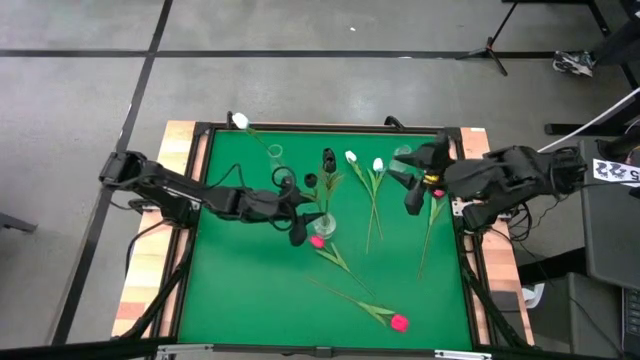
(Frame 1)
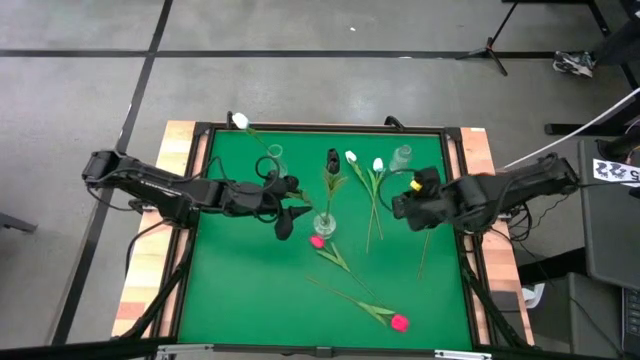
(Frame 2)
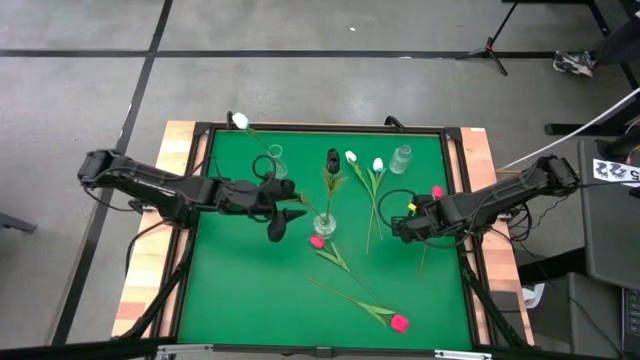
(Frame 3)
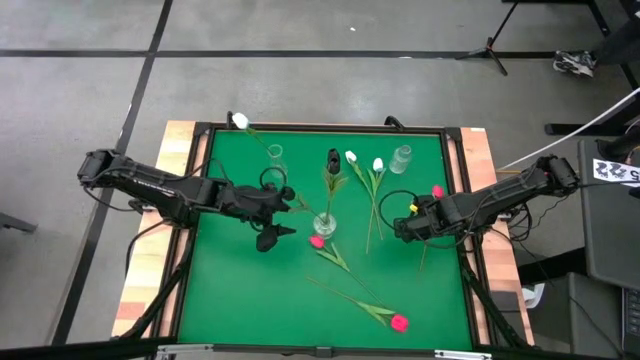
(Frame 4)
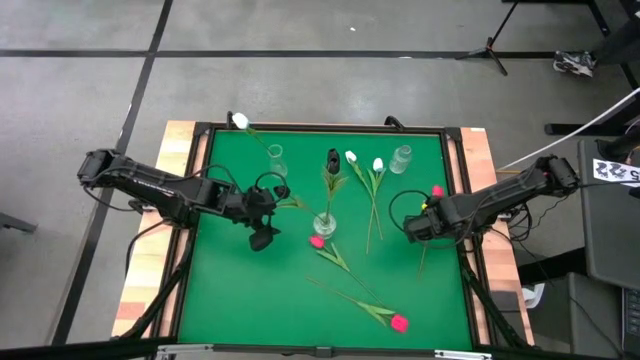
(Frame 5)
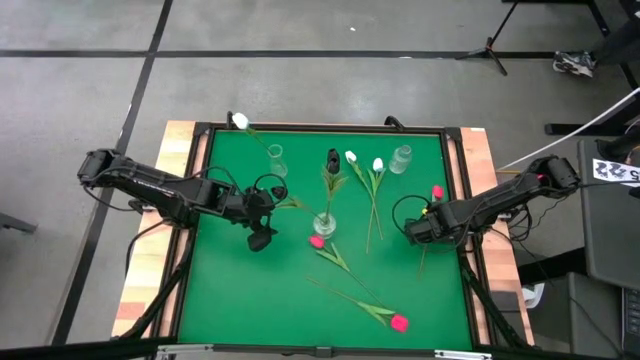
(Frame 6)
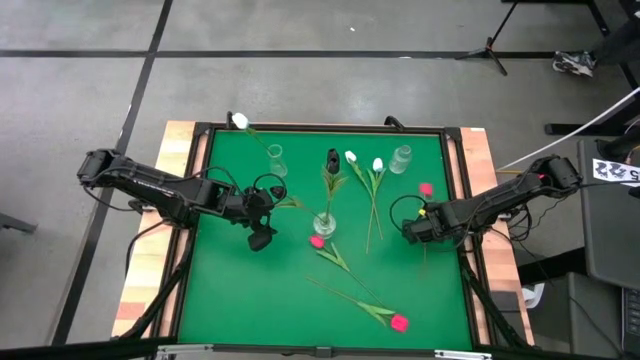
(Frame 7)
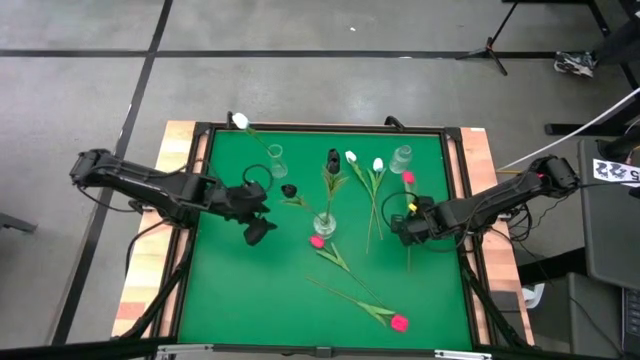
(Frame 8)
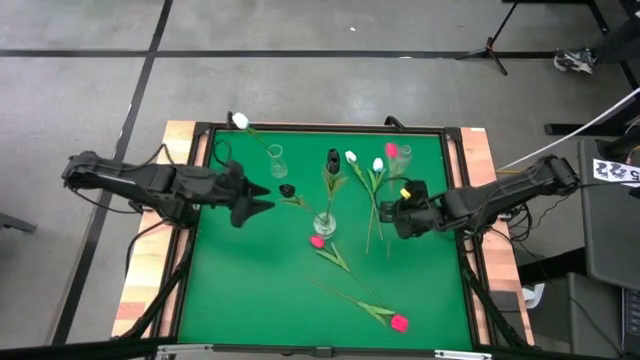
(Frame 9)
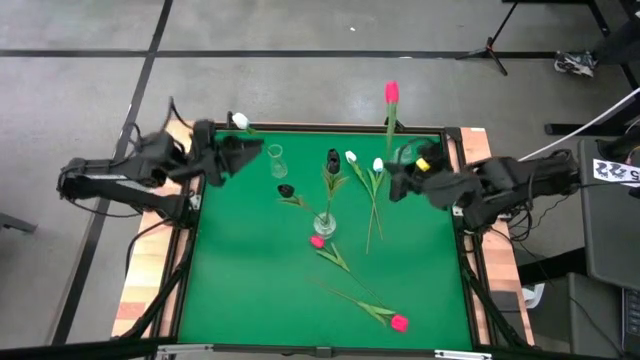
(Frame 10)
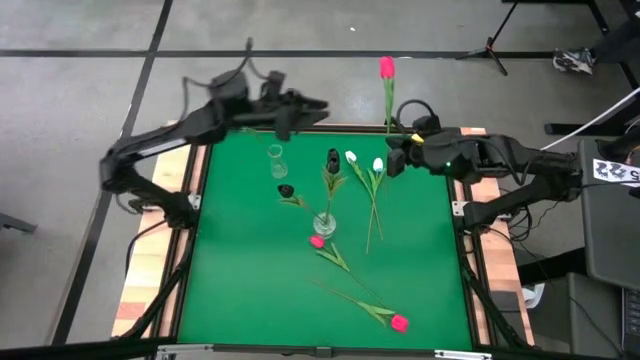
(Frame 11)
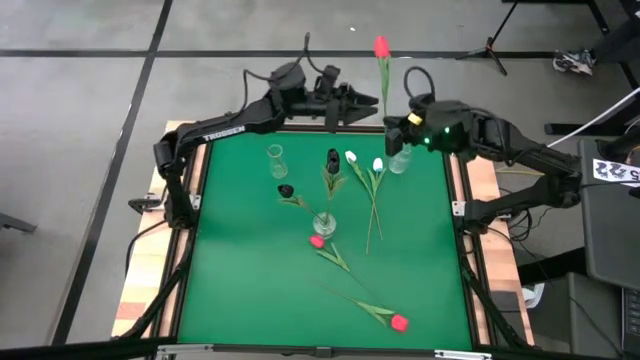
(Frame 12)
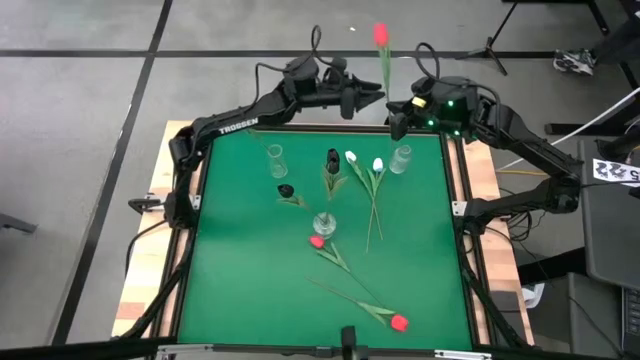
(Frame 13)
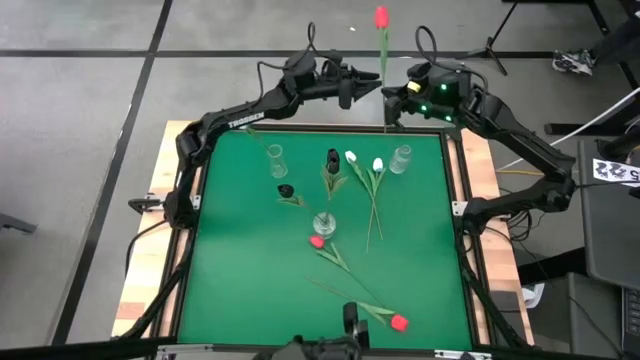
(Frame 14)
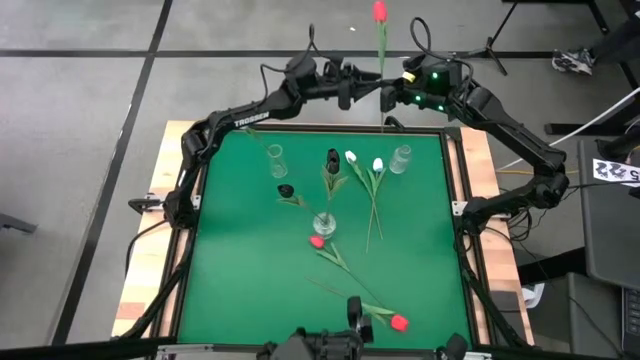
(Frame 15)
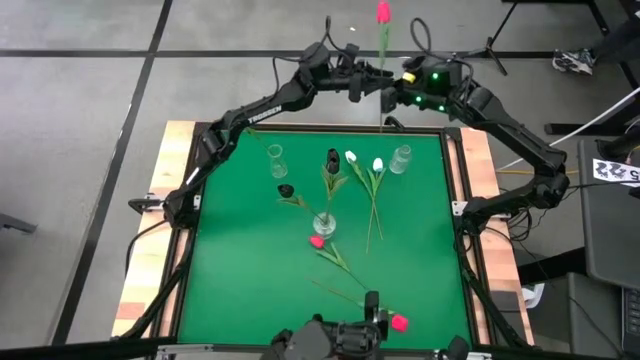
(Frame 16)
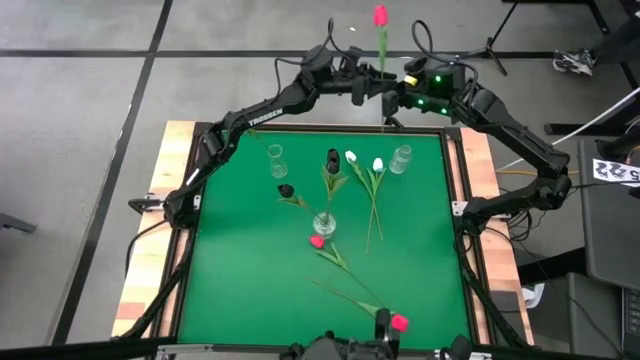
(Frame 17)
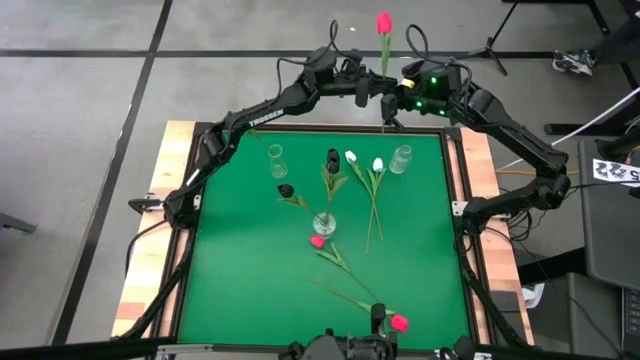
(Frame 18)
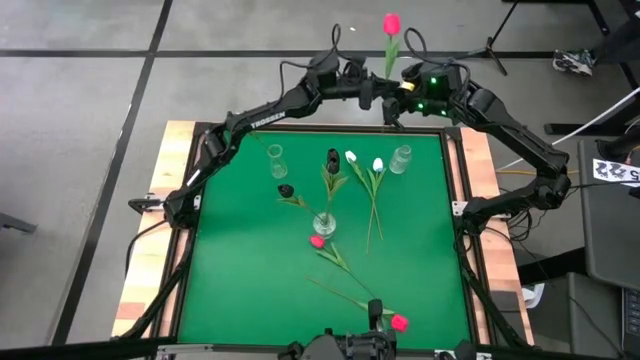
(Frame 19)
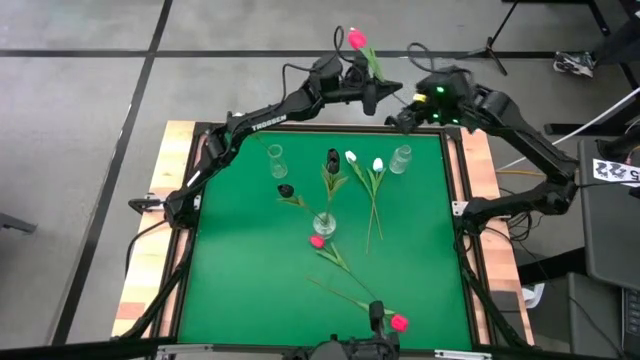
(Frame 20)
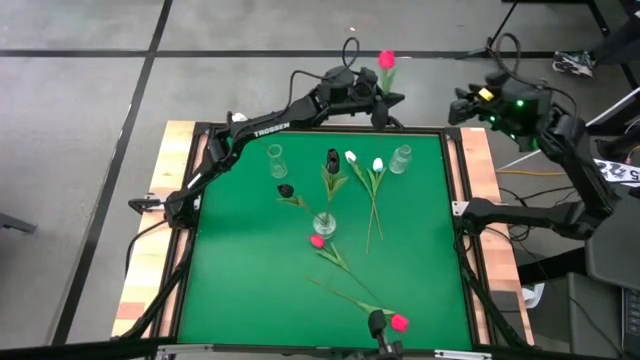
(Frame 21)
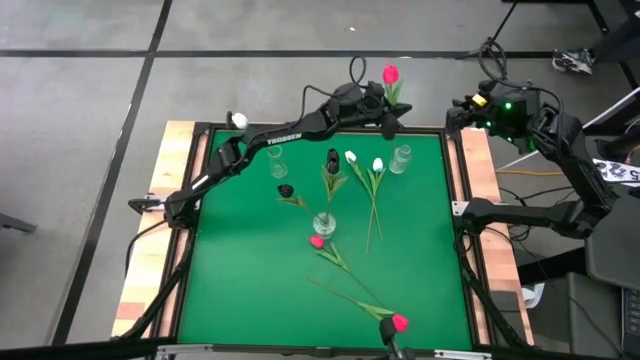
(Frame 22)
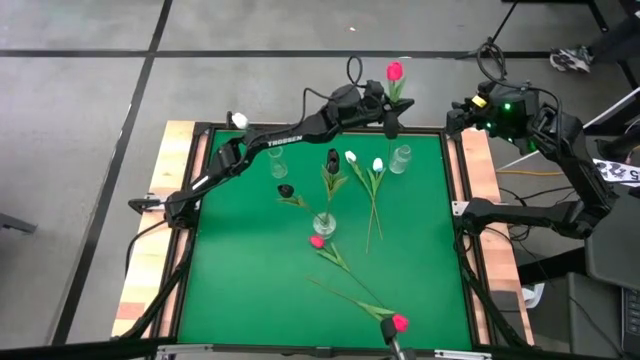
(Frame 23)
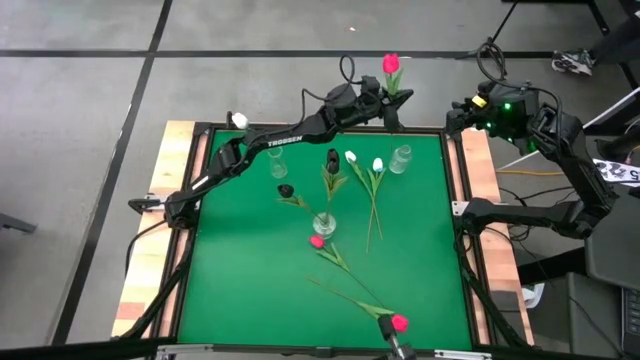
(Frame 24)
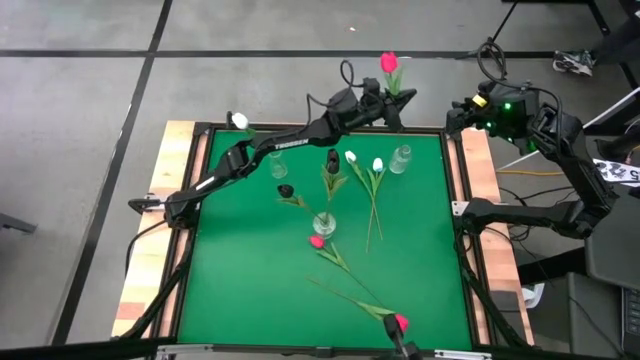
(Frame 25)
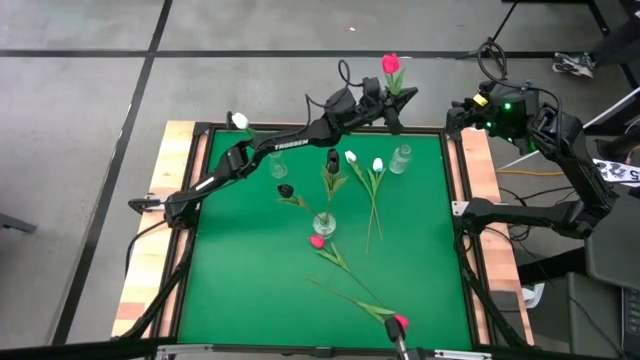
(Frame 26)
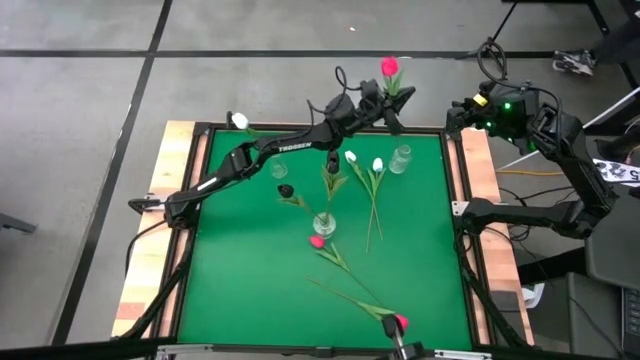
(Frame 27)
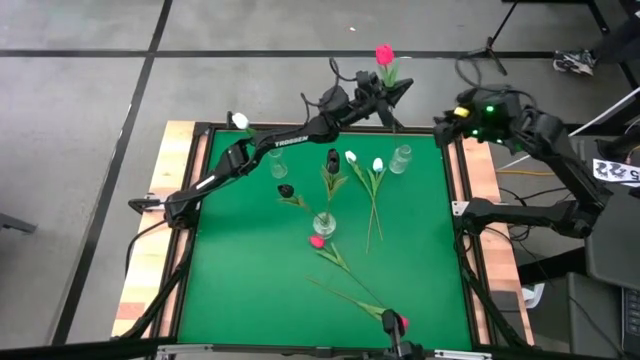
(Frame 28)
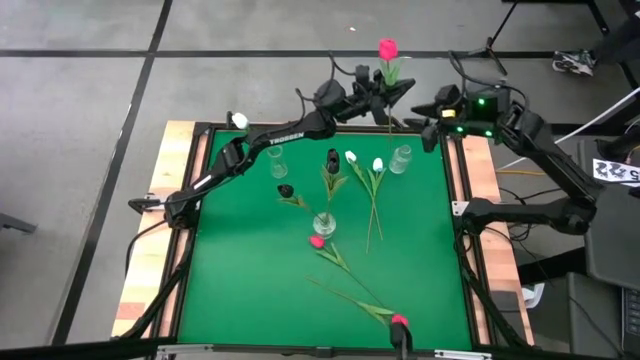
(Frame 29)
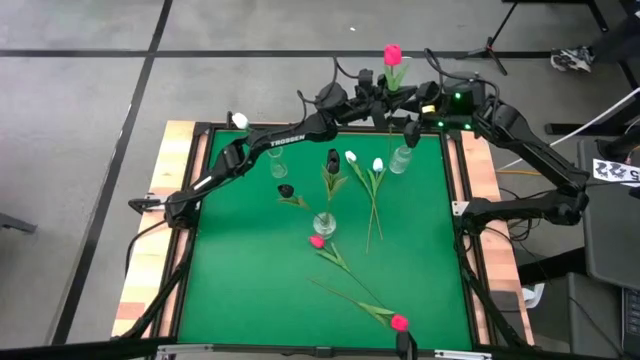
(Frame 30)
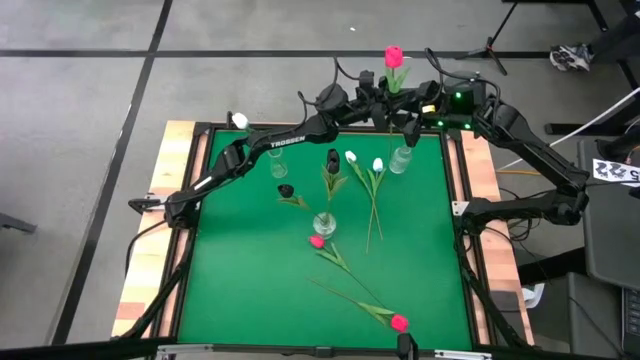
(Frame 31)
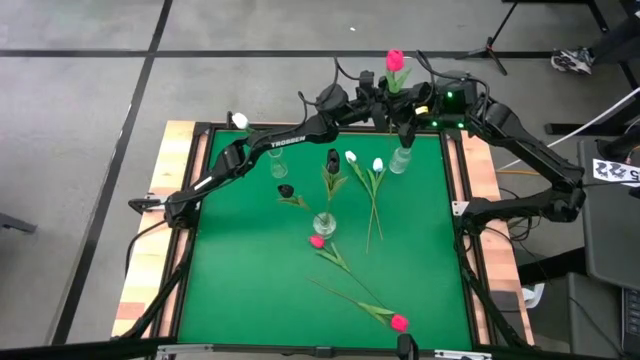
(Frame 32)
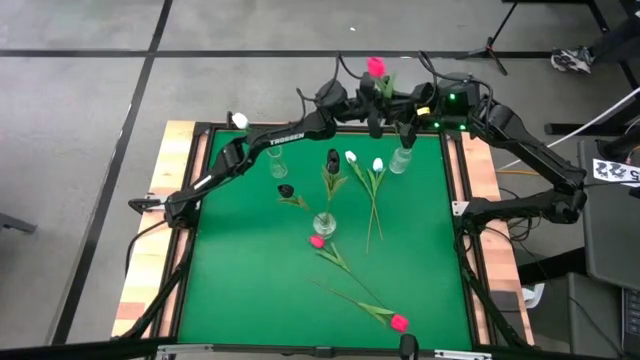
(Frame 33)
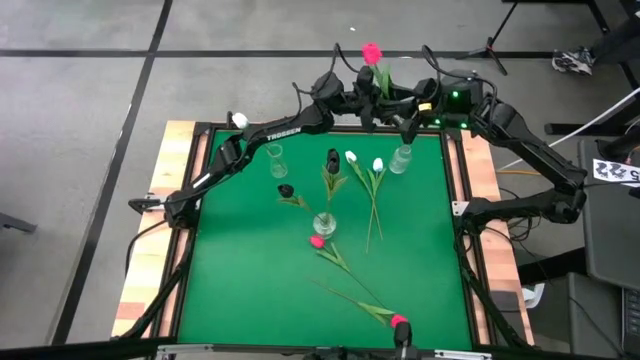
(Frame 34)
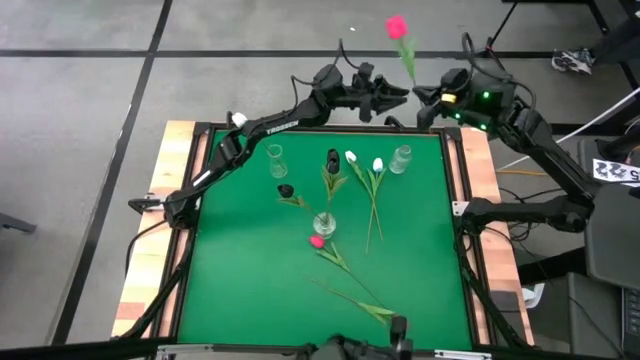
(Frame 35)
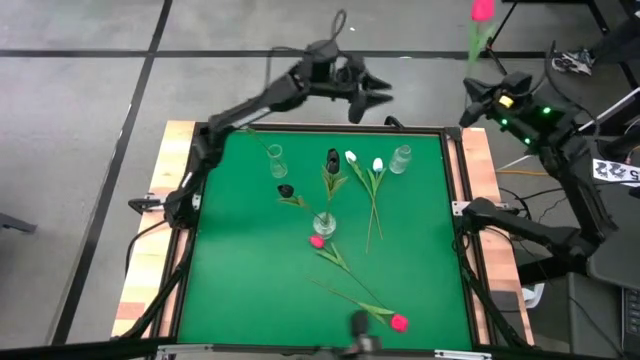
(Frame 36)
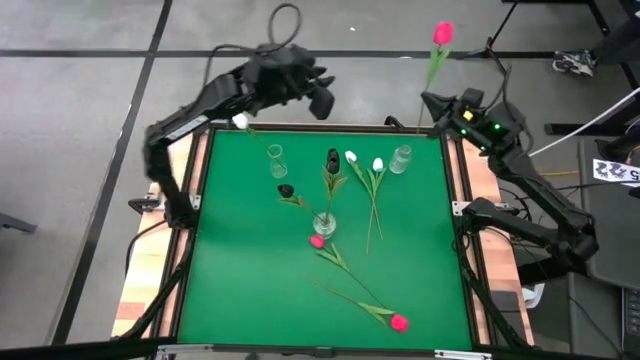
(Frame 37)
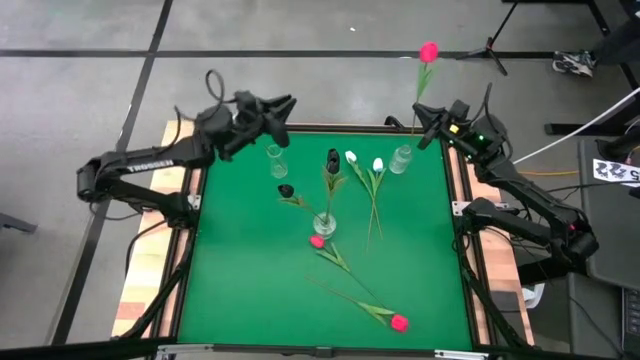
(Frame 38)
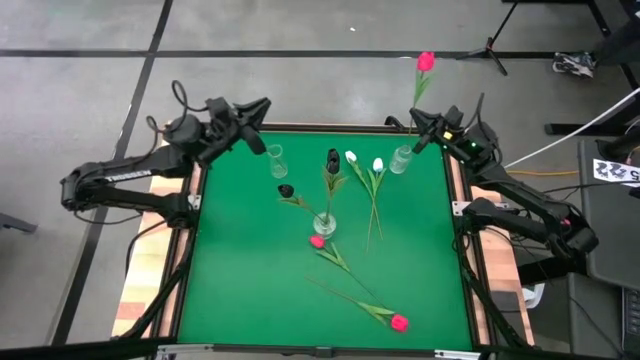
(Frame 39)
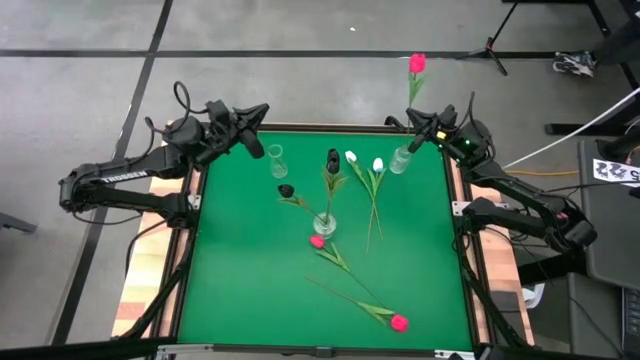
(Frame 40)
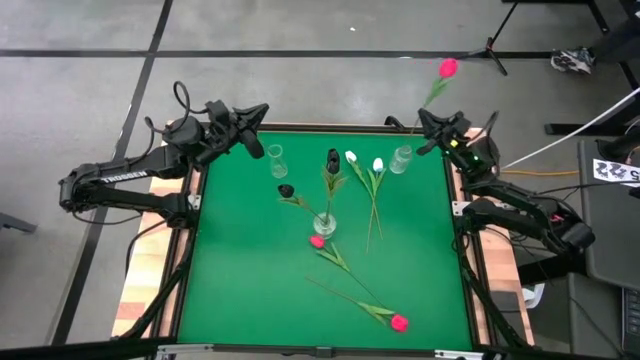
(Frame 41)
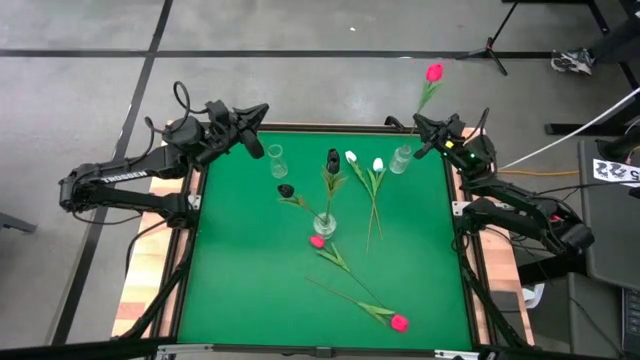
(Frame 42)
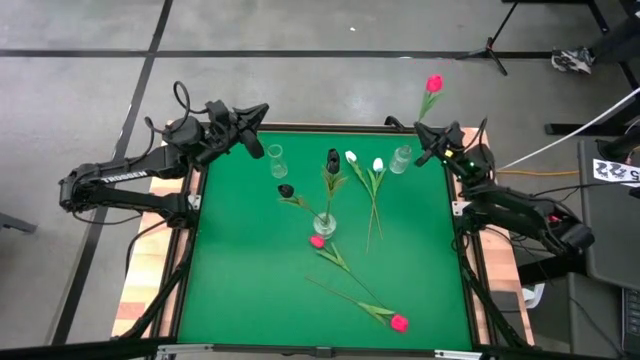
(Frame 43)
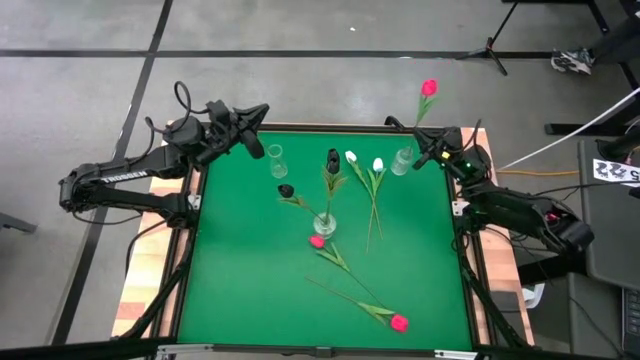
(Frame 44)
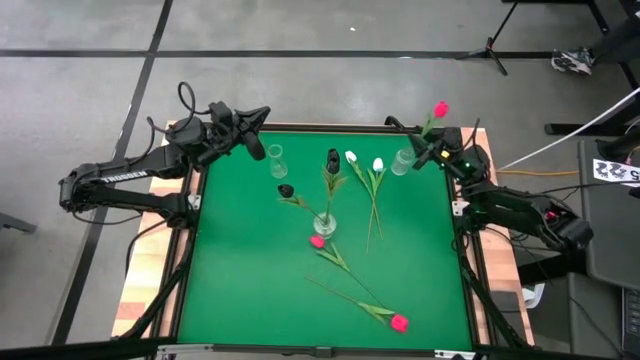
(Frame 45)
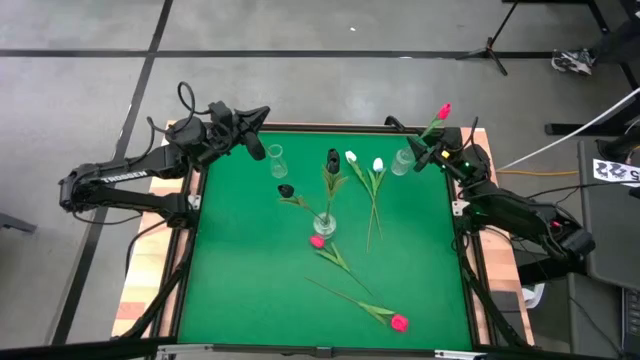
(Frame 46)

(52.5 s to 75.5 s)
Task: Sort flowers into vase by color
Put the top pink tulip into the top right transparent vase
